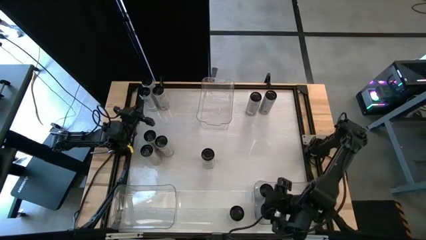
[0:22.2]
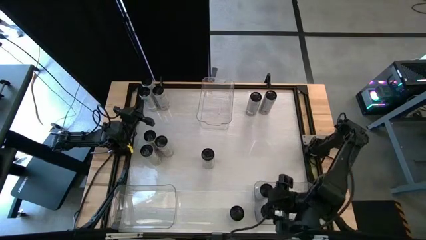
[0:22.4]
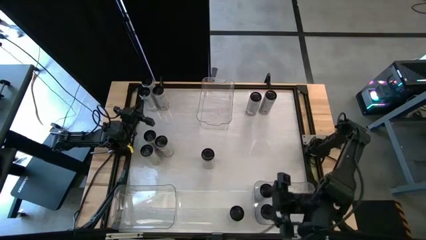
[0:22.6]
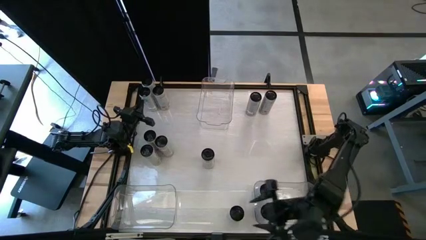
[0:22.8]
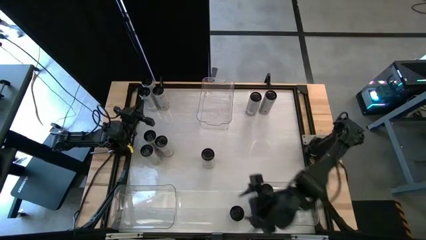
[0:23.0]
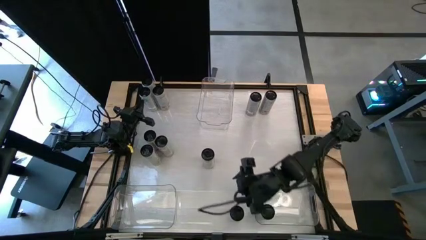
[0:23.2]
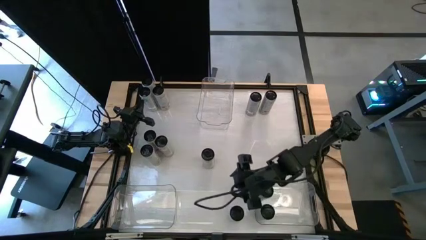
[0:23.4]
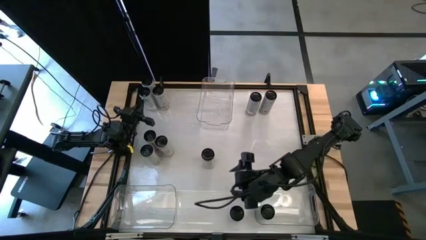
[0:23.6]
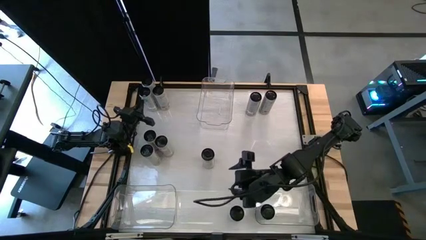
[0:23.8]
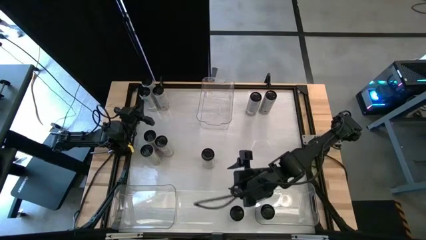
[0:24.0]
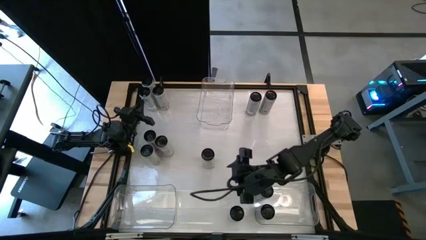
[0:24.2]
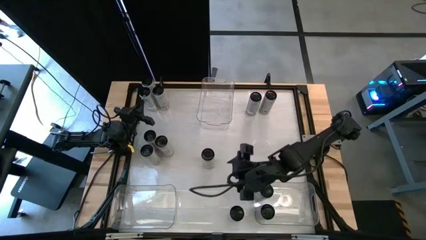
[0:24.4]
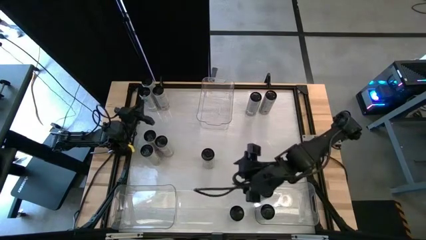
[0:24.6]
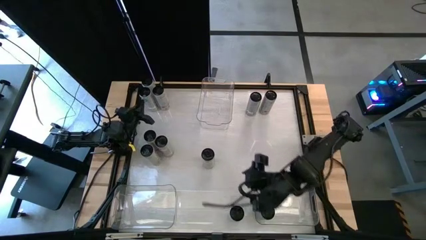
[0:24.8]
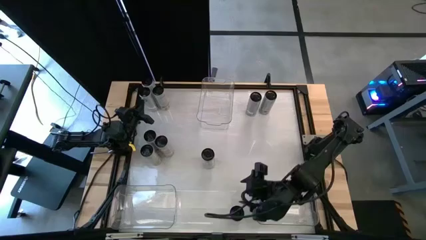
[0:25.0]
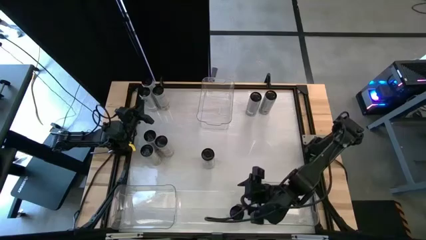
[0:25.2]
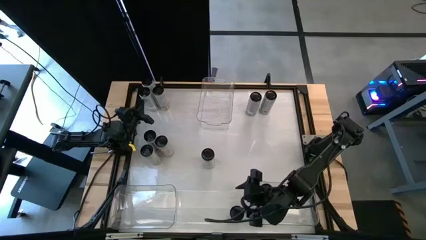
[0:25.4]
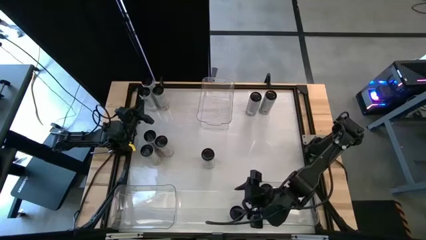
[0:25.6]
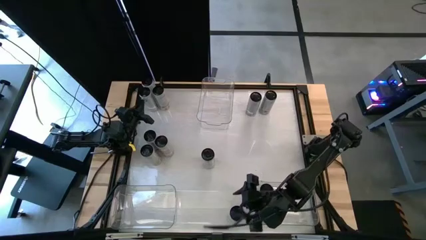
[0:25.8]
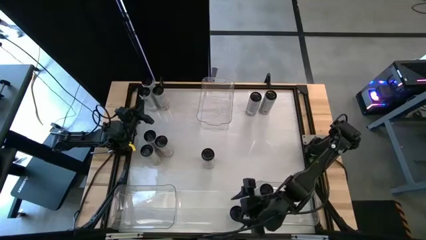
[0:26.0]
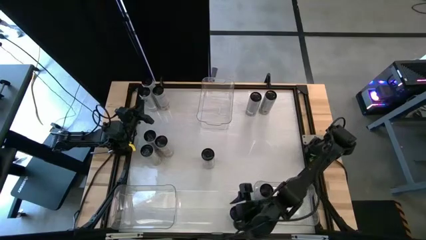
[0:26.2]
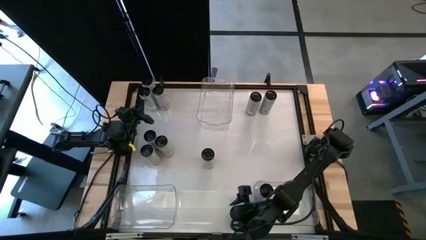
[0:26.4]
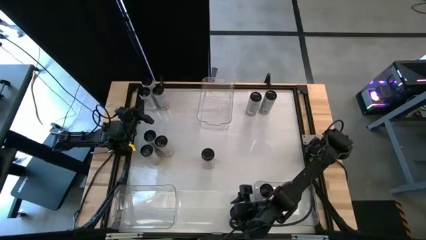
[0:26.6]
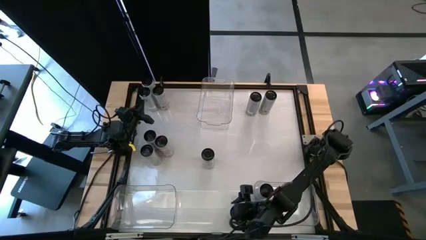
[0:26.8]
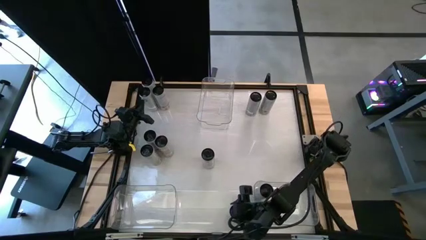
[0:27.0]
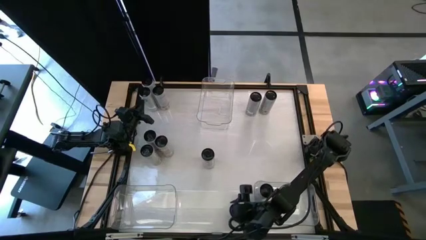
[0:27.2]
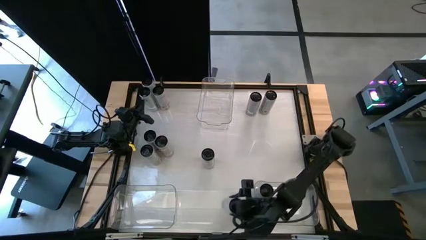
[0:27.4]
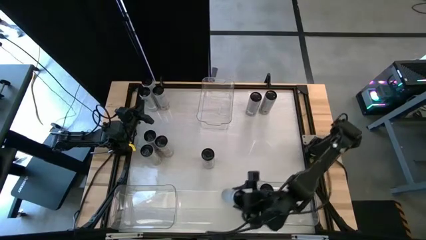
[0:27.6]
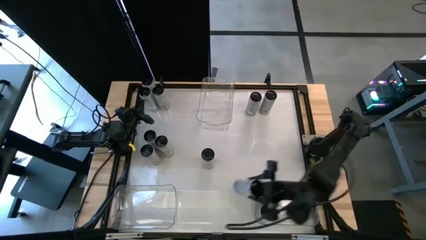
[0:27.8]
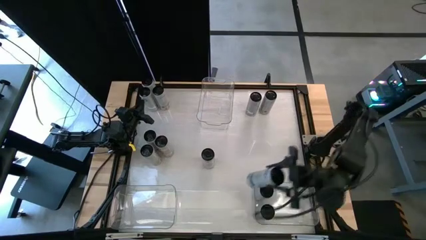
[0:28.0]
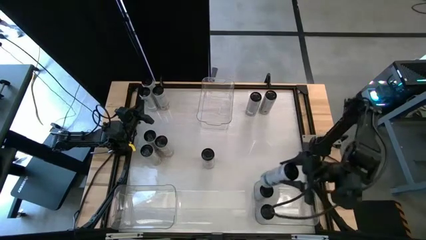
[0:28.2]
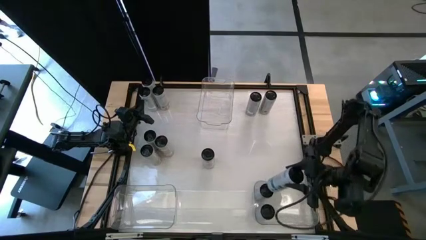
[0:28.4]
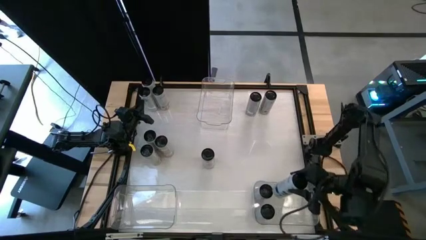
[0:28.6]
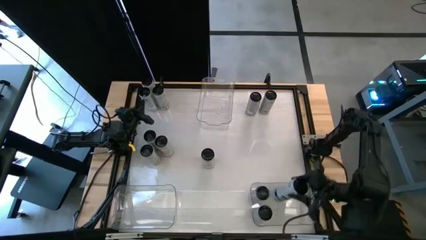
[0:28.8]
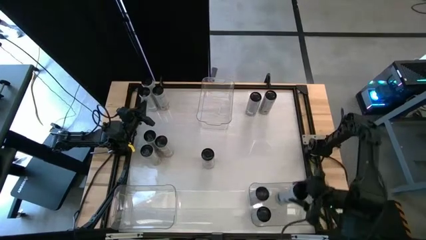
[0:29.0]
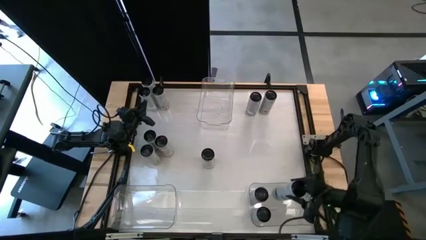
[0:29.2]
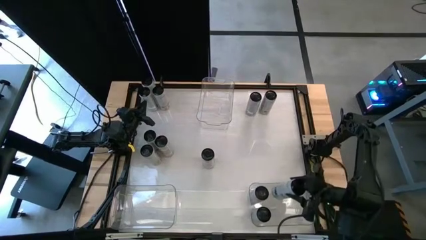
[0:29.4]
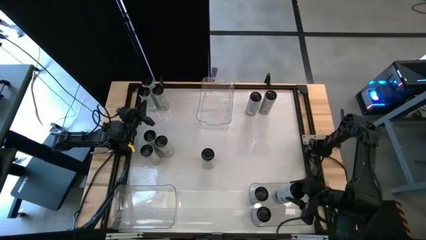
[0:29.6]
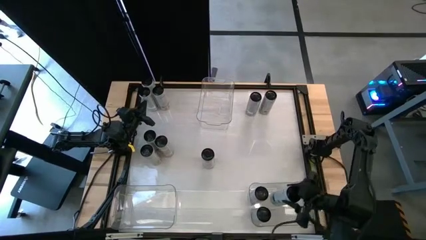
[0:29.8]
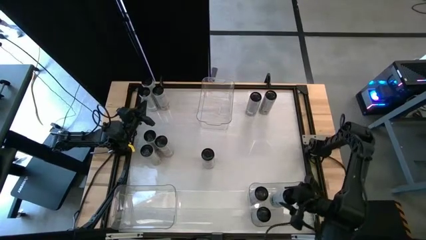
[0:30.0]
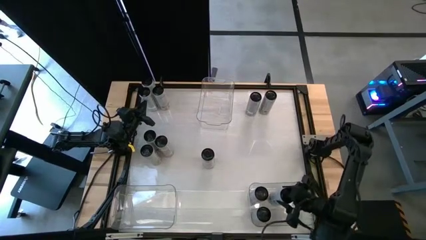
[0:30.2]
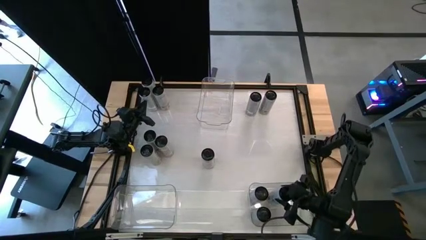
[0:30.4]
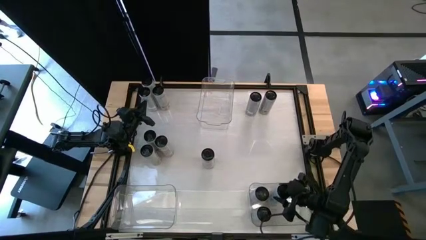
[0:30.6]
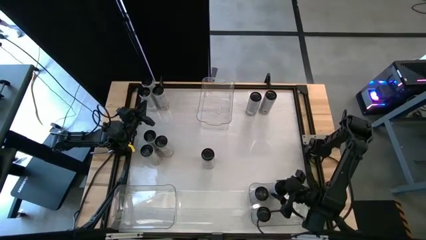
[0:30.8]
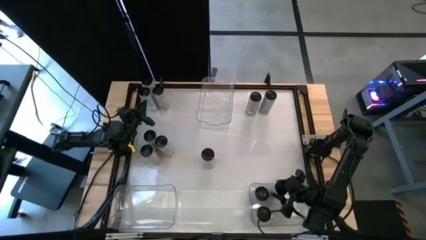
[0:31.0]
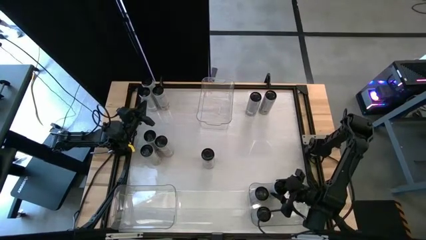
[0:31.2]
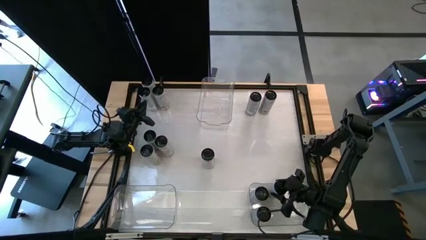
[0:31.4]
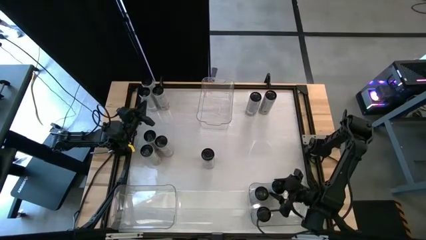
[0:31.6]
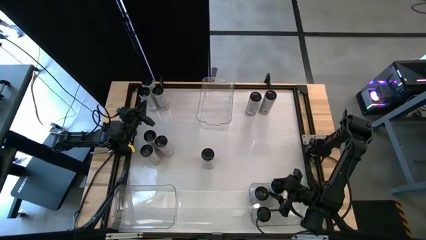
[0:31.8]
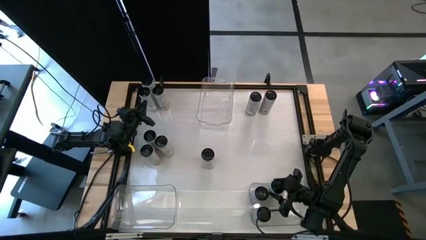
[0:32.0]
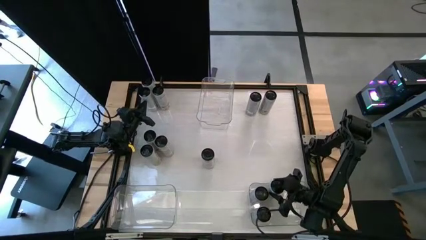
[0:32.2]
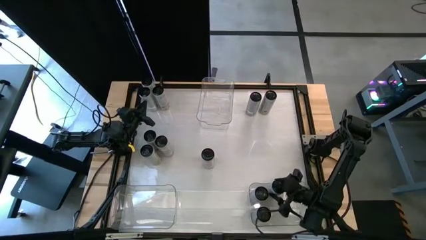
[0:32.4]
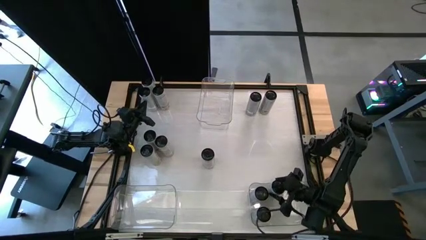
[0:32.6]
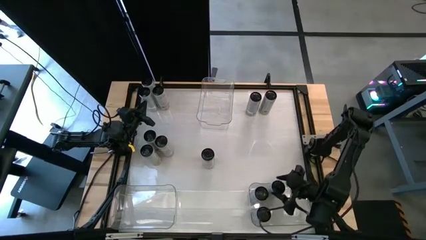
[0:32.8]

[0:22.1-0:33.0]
Task: Sort soda cans
Put the bottom white blue soda can into the bottom right transparent bin
